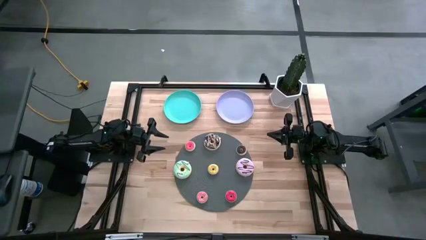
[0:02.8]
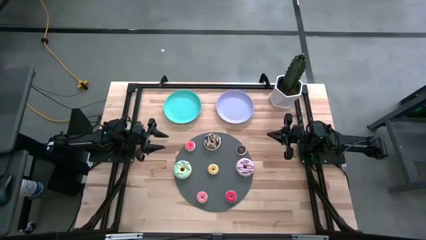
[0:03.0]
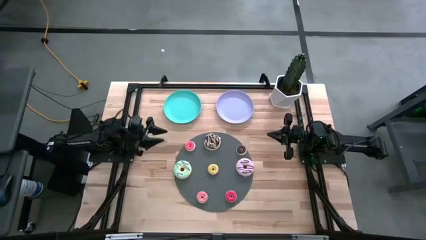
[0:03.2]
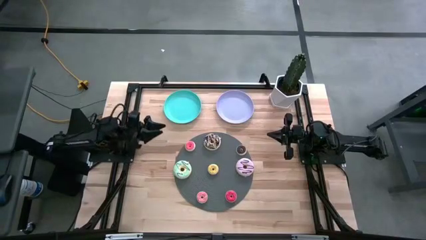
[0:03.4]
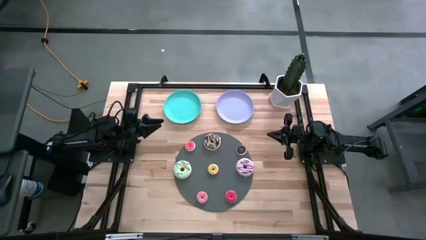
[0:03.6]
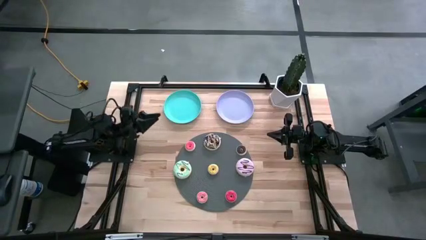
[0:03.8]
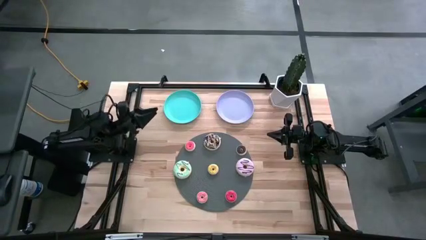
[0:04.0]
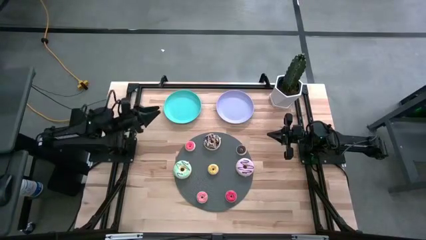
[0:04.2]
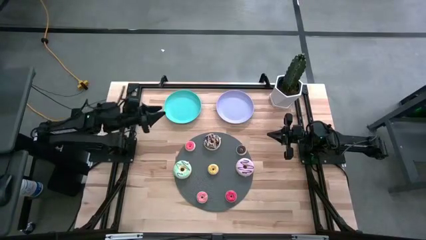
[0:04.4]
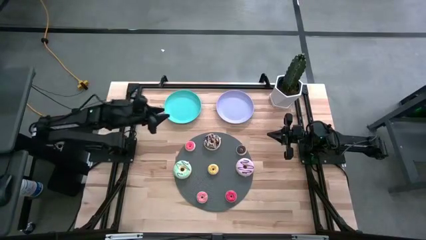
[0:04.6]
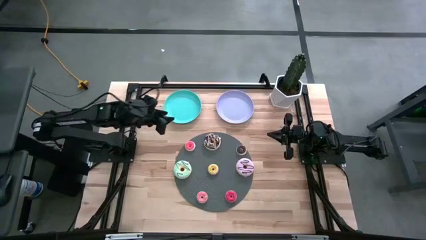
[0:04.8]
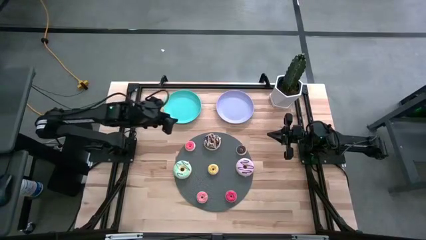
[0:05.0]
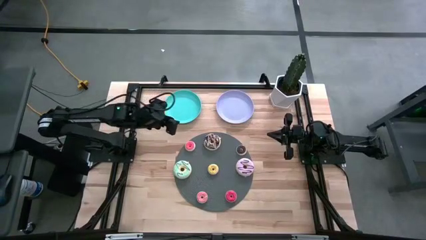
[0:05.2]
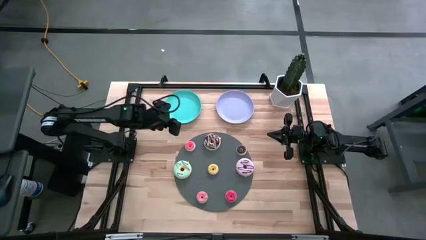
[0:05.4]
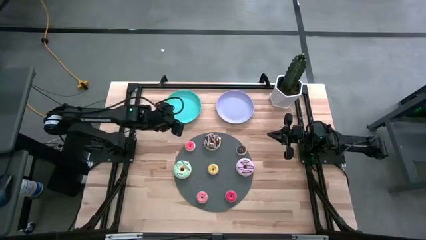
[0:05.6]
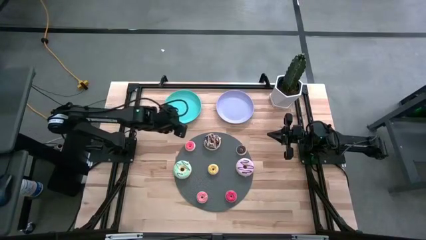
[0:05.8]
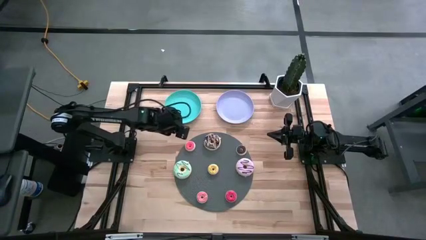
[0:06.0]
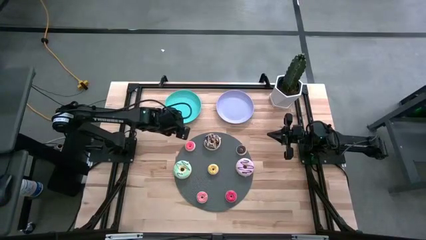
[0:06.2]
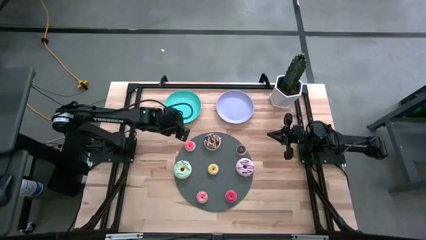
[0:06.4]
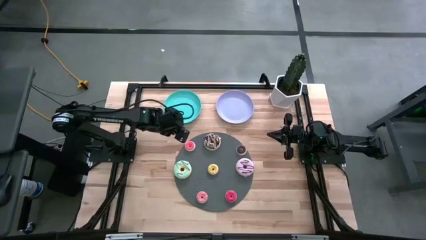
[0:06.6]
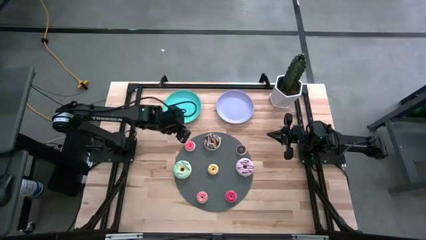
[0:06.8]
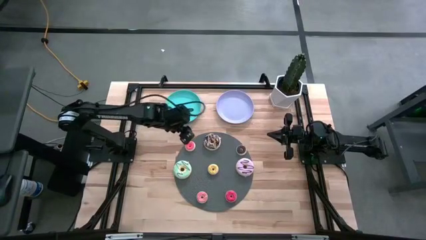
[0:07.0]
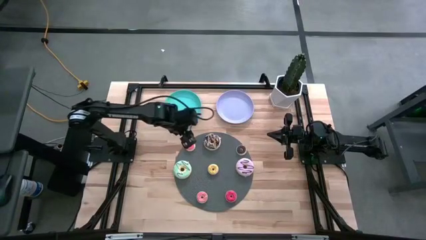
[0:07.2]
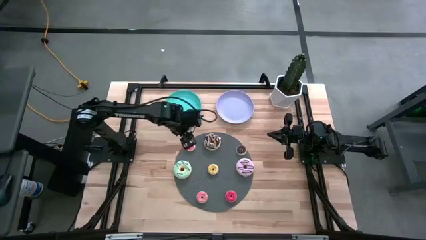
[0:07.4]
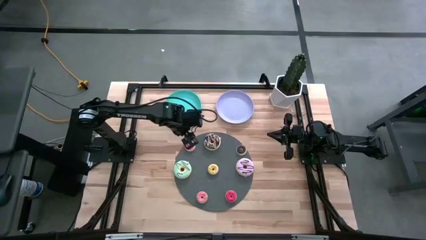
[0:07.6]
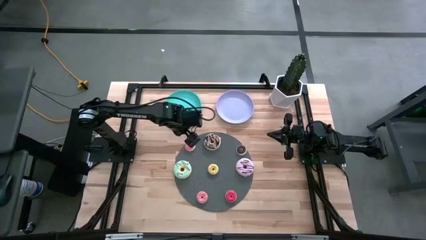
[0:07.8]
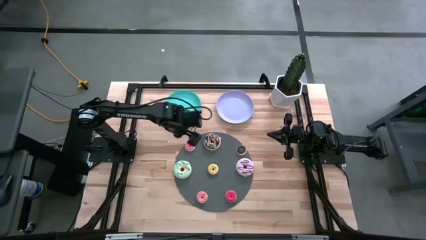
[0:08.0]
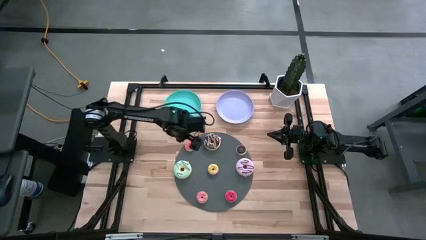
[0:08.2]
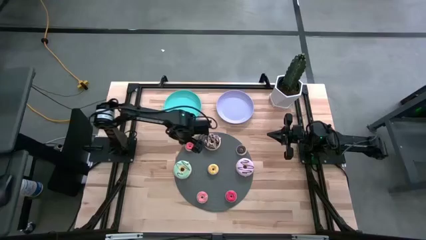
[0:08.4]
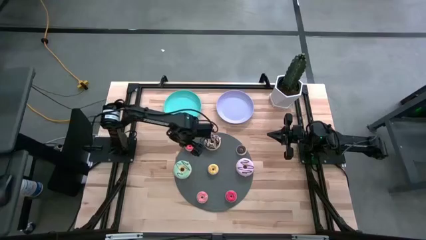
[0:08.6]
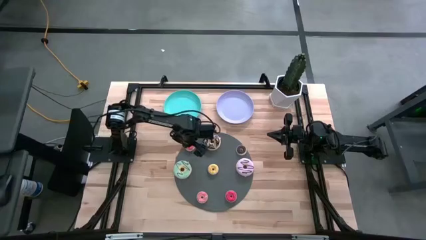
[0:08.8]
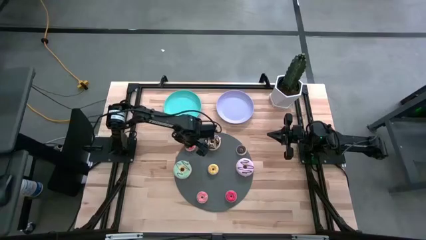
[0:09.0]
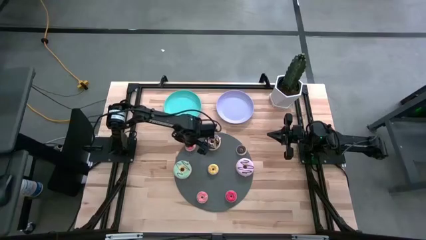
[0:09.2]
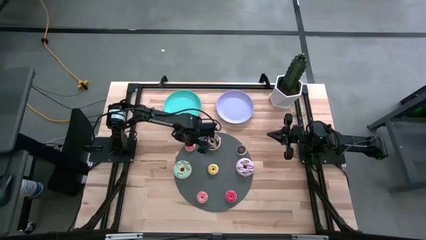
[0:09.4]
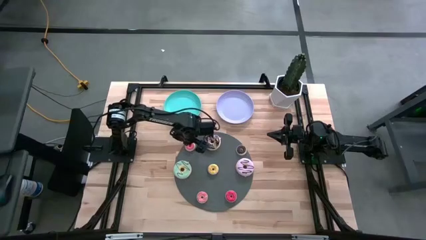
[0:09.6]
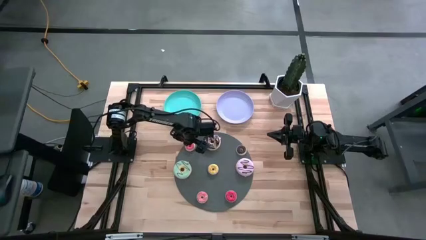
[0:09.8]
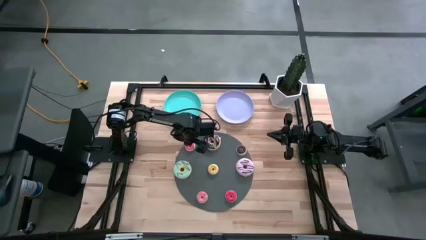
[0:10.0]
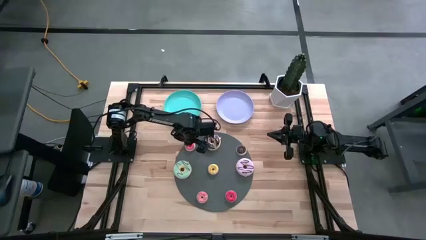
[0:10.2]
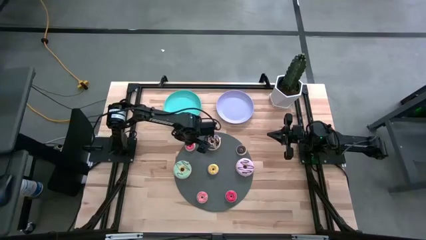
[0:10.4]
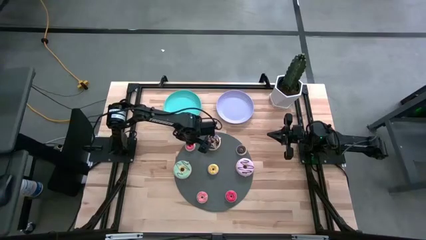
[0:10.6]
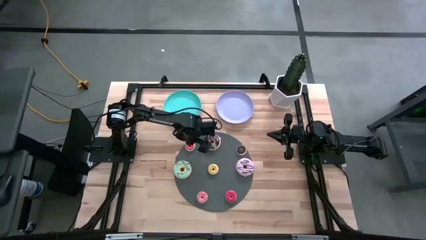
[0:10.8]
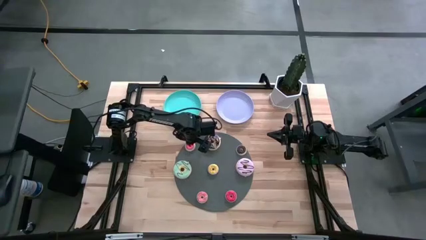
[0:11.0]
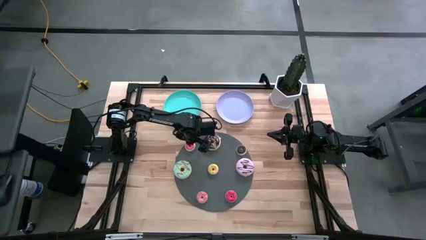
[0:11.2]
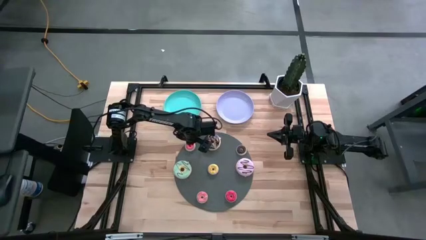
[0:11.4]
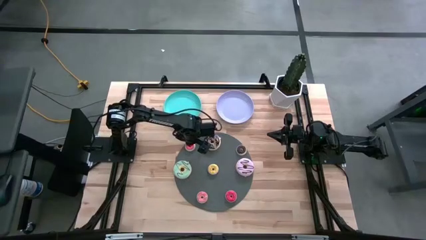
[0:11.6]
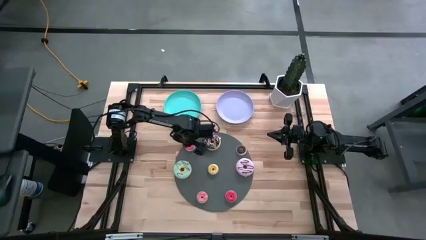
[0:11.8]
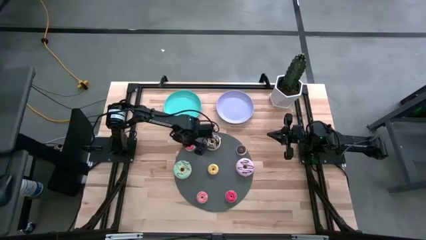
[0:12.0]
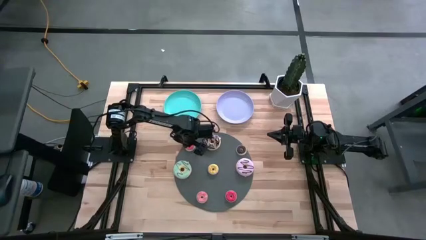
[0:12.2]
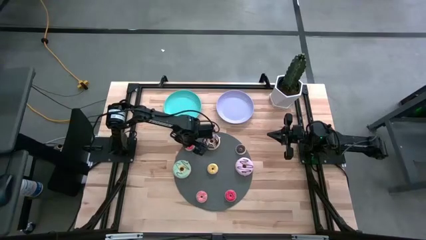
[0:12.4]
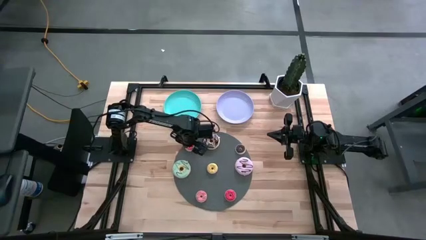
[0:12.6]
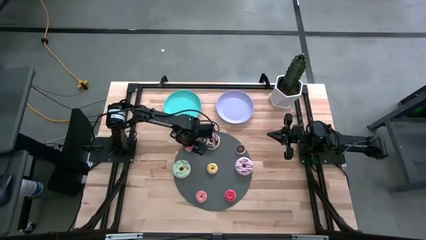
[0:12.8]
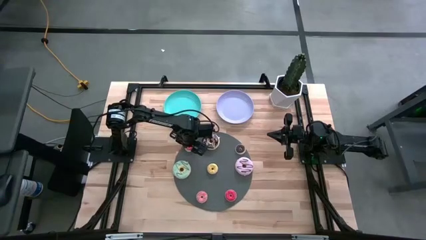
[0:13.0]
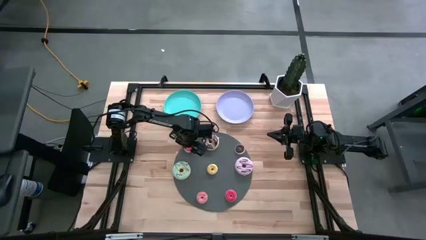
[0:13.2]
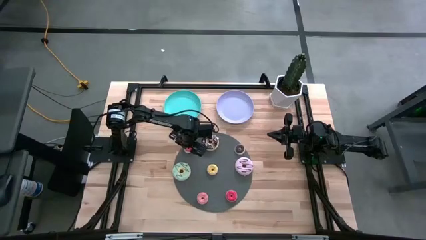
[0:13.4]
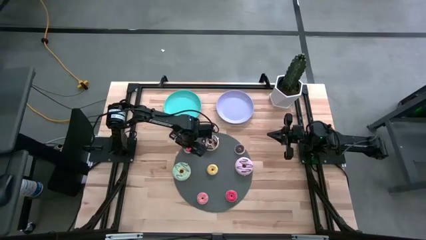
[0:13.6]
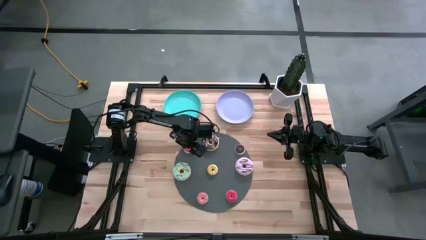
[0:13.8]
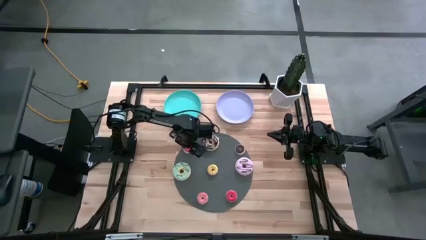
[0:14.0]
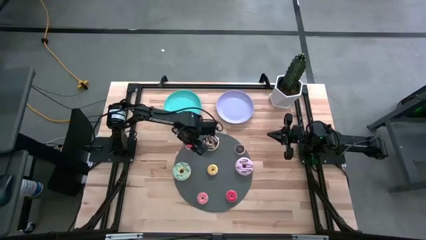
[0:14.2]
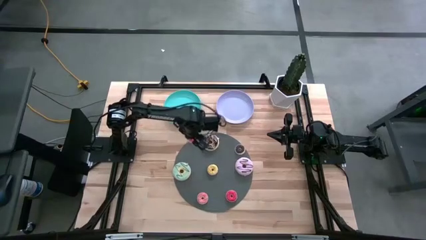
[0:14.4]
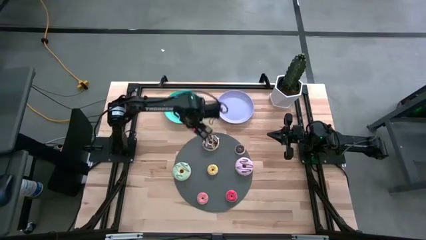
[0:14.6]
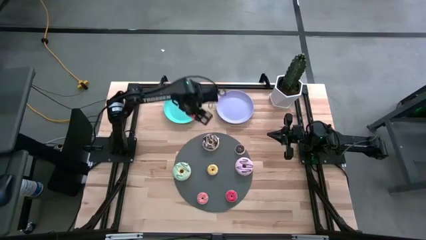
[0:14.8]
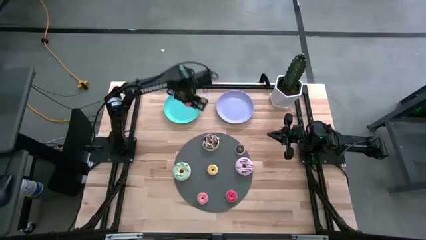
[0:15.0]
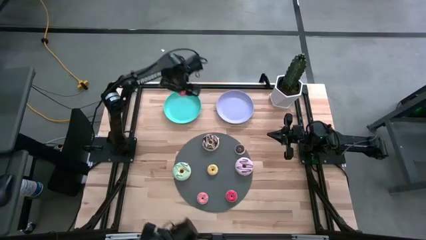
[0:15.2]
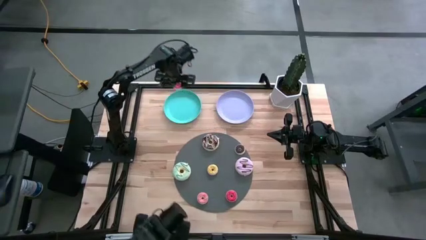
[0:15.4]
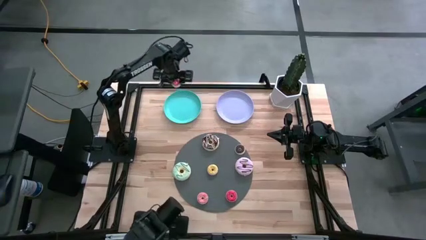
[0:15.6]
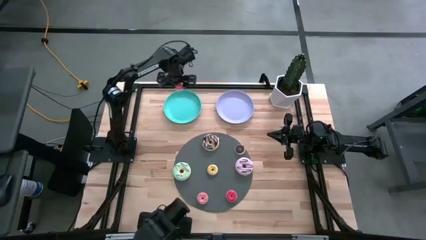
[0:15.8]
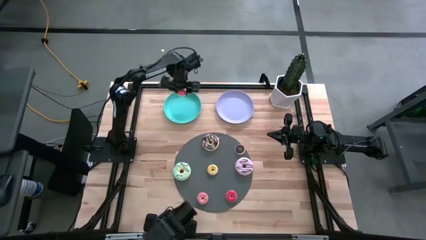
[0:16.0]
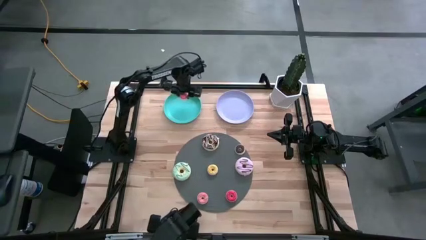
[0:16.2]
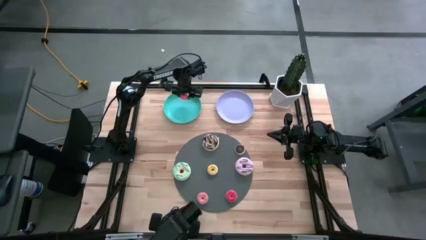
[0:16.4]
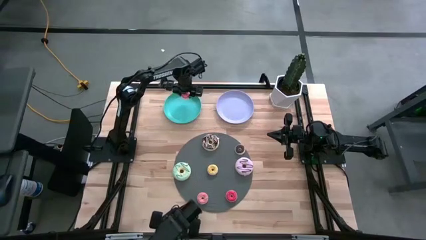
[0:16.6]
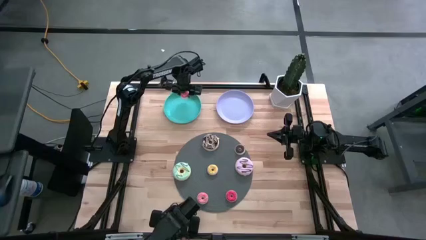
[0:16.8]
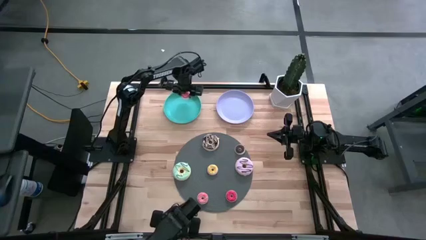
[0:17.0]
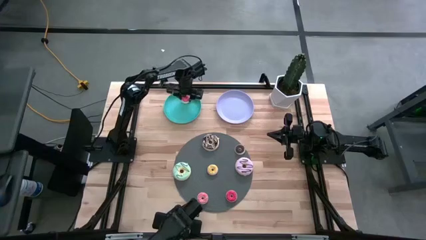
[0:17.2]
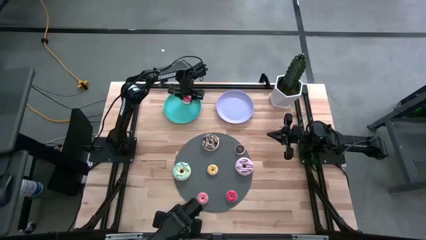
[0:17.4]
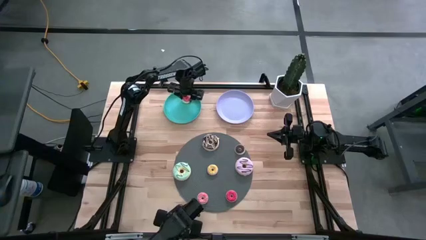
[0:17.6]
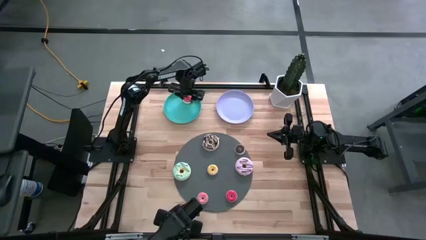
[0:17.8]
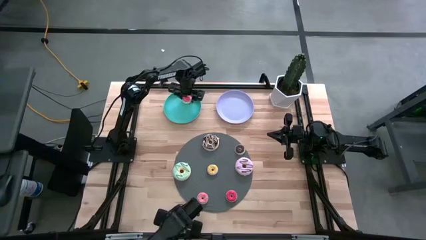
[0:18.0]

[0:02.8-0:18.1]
Task: Pick & Place donuts
Put the small orange donut on the green plate
